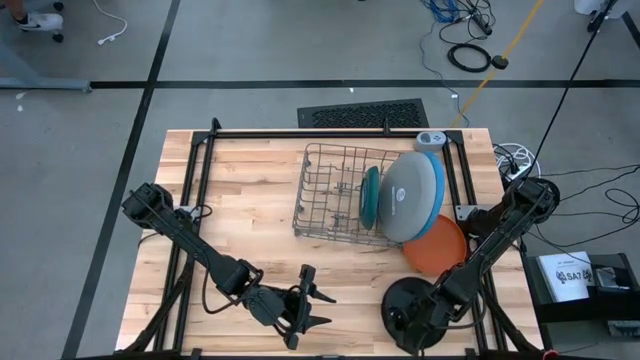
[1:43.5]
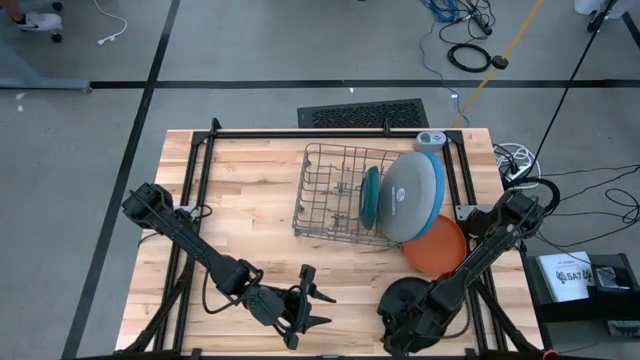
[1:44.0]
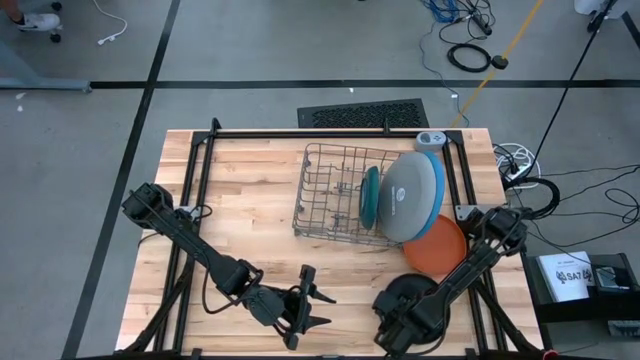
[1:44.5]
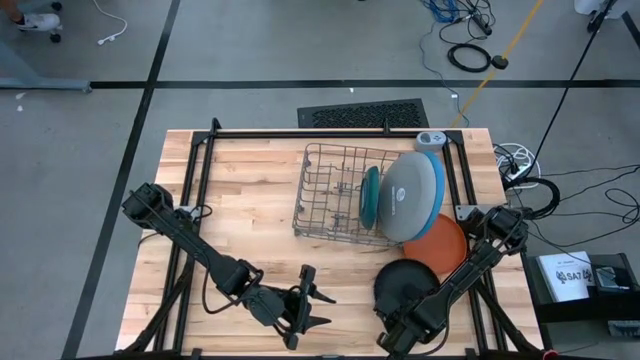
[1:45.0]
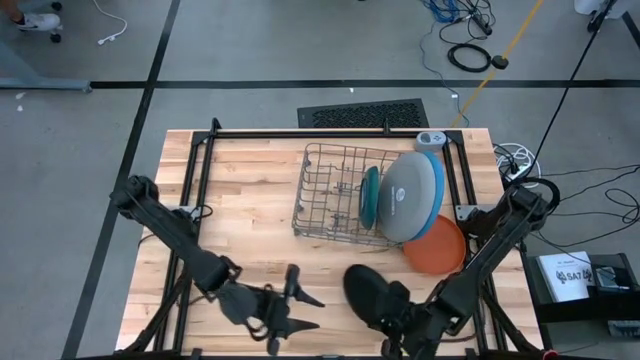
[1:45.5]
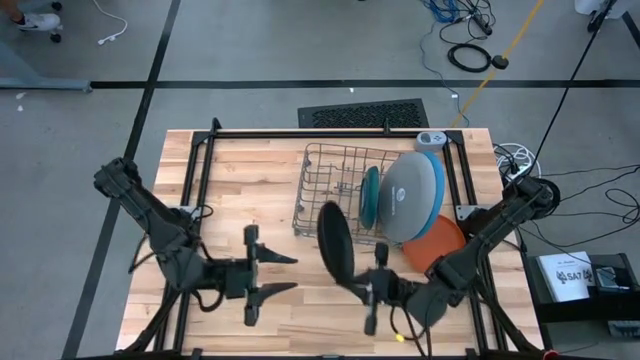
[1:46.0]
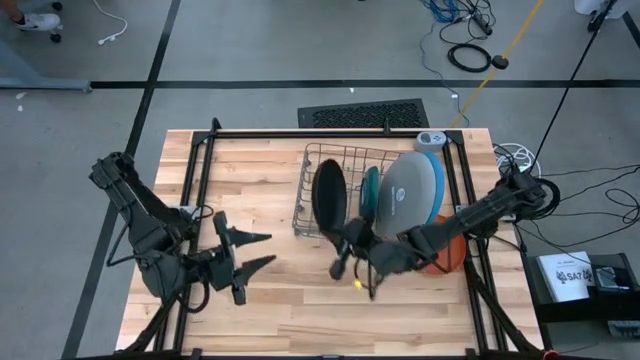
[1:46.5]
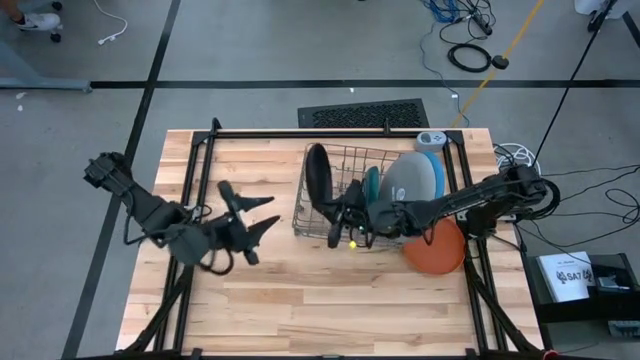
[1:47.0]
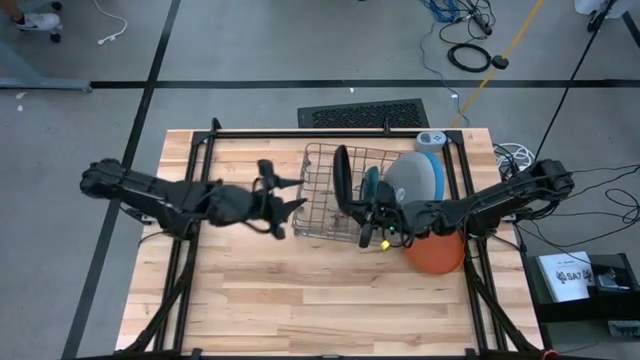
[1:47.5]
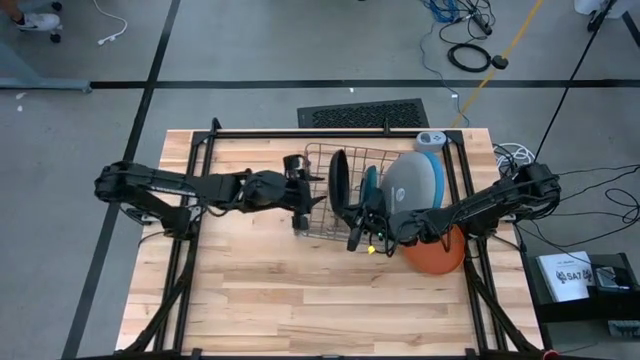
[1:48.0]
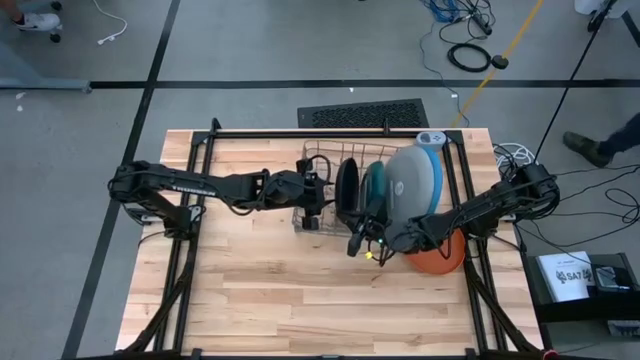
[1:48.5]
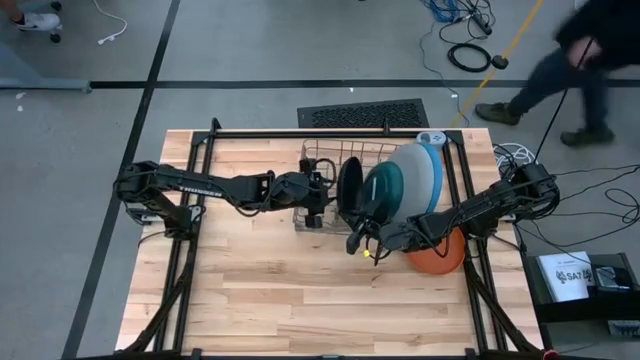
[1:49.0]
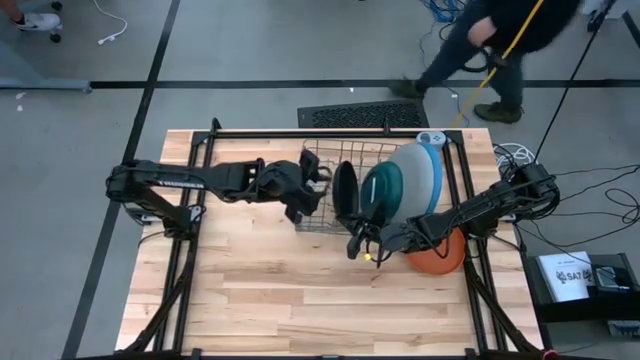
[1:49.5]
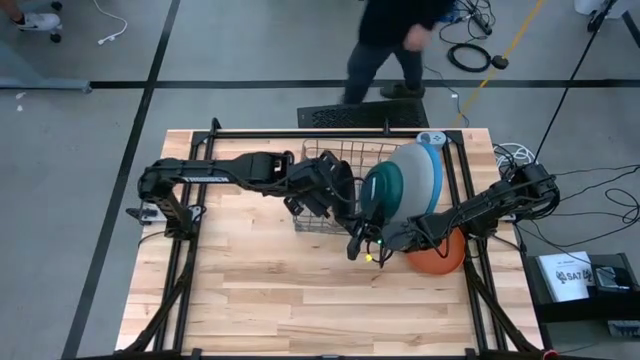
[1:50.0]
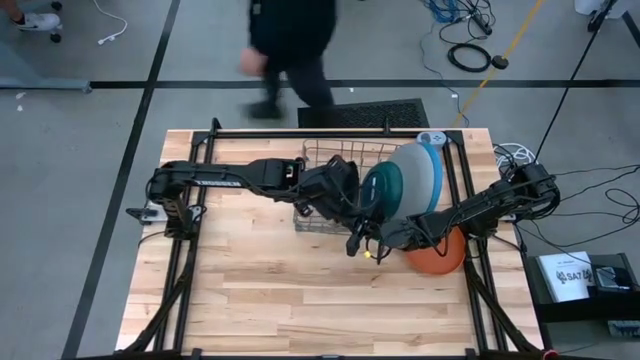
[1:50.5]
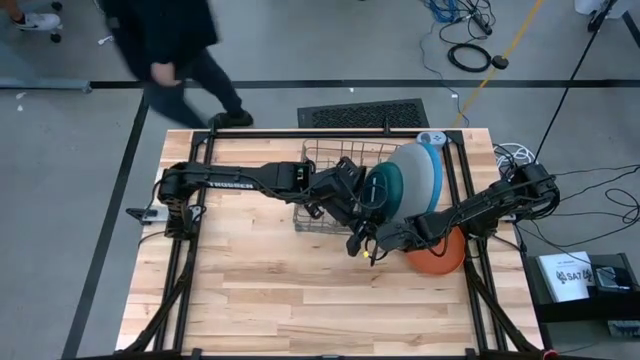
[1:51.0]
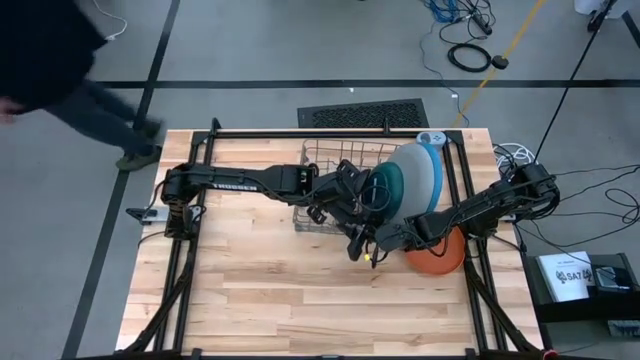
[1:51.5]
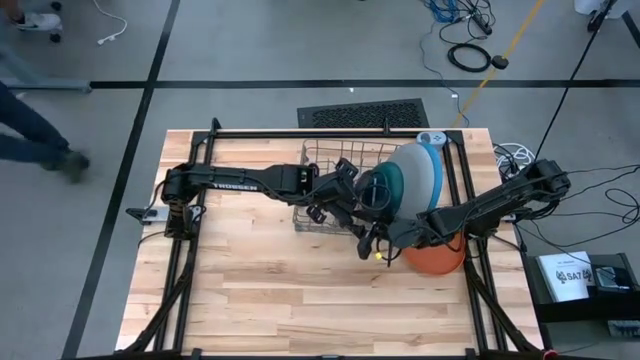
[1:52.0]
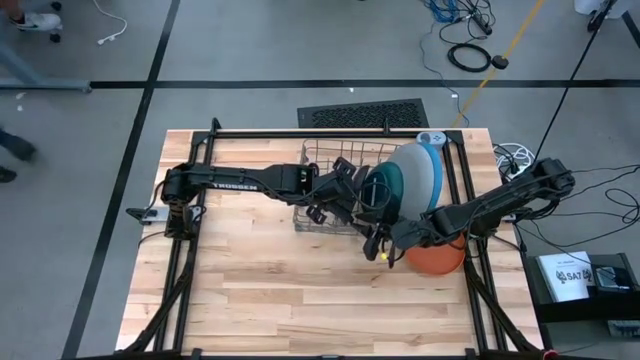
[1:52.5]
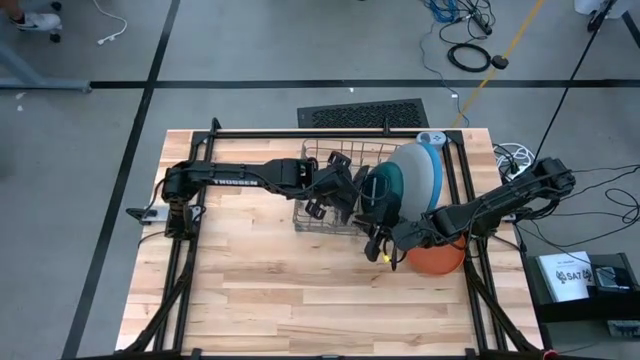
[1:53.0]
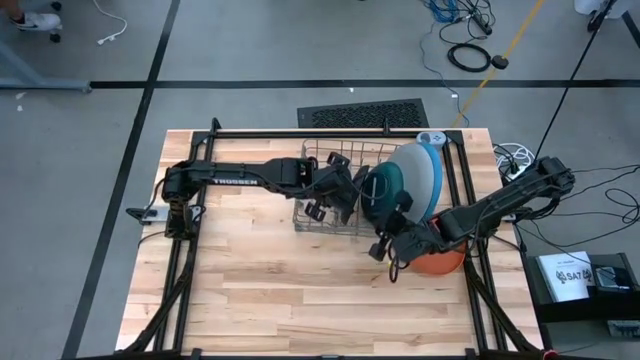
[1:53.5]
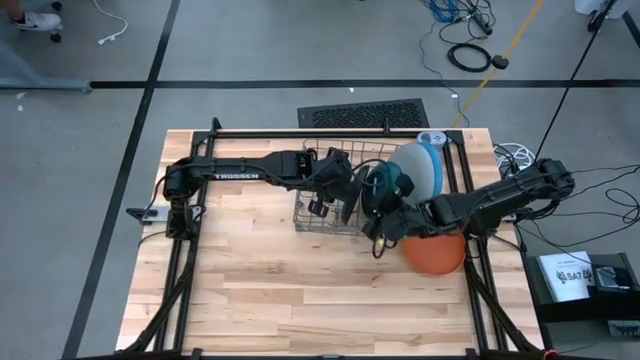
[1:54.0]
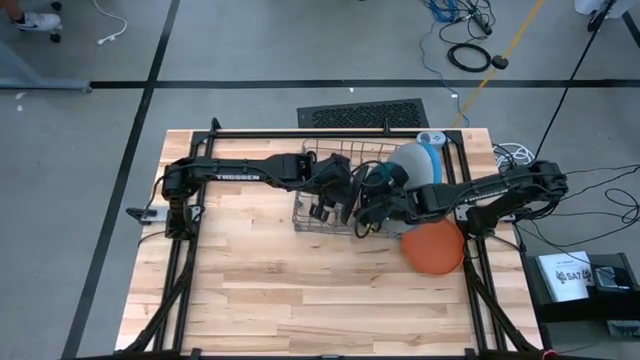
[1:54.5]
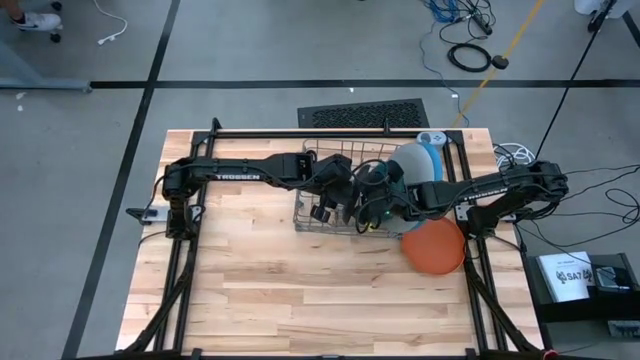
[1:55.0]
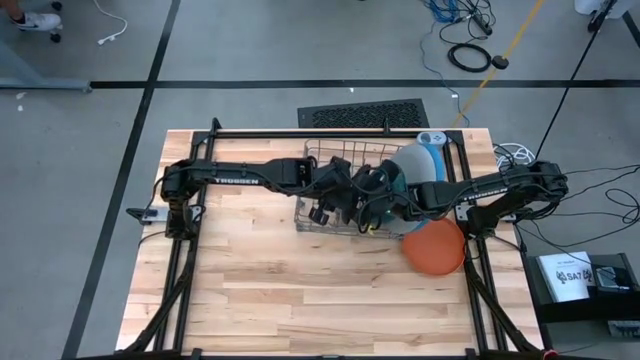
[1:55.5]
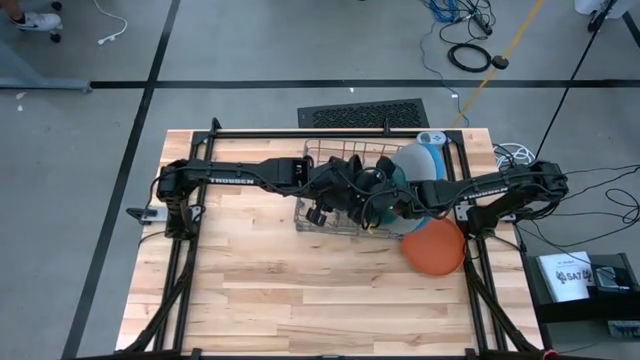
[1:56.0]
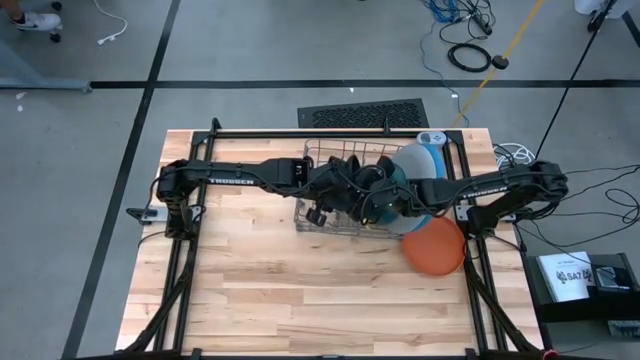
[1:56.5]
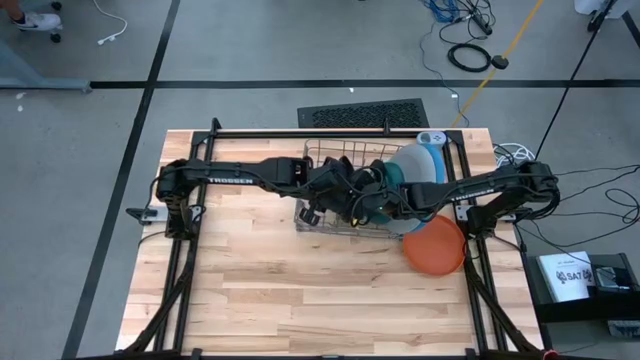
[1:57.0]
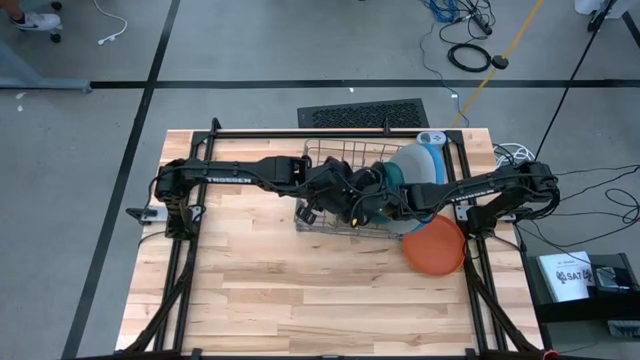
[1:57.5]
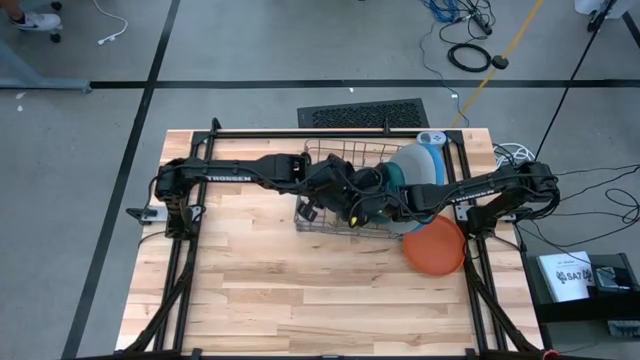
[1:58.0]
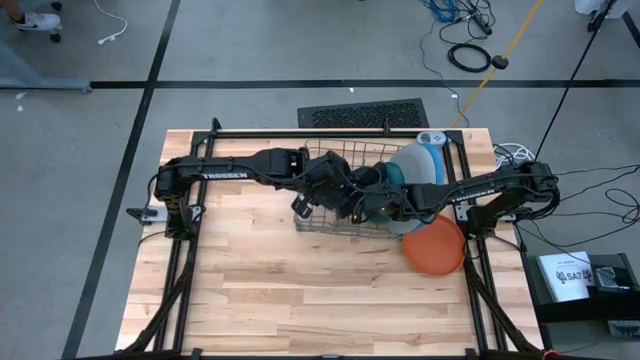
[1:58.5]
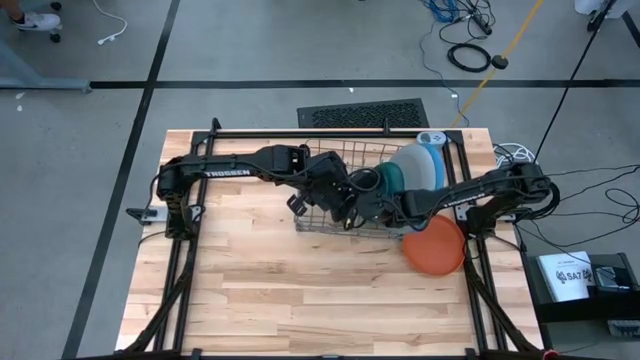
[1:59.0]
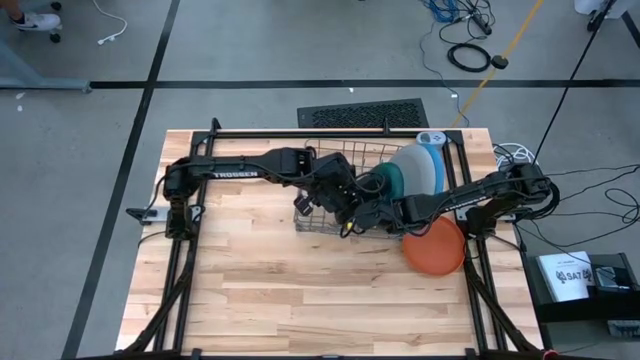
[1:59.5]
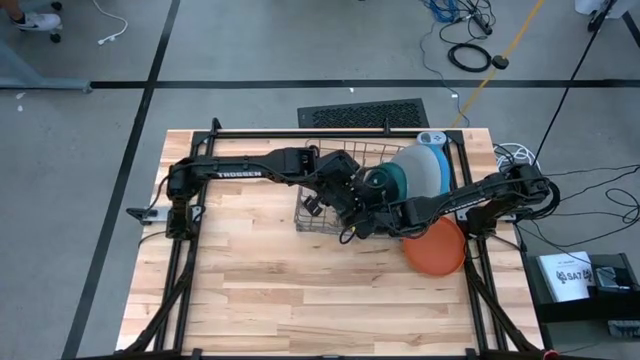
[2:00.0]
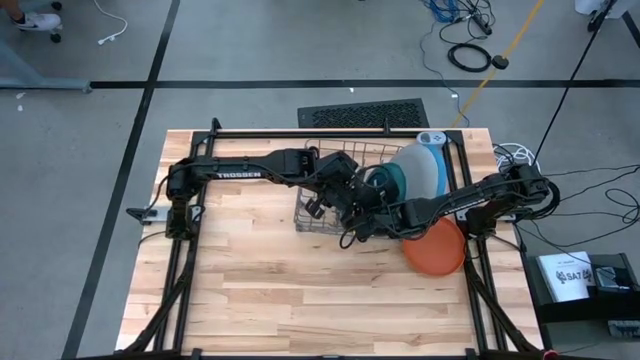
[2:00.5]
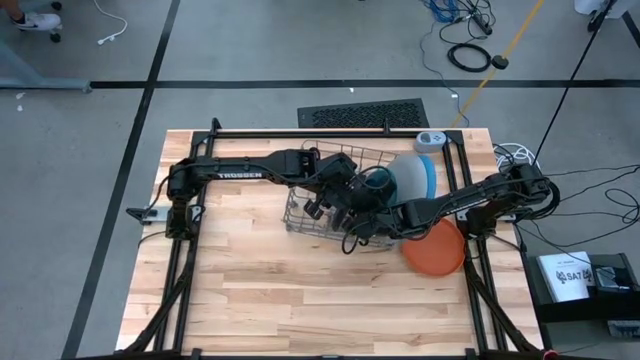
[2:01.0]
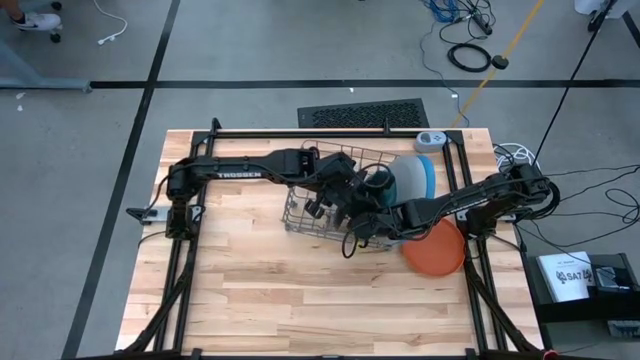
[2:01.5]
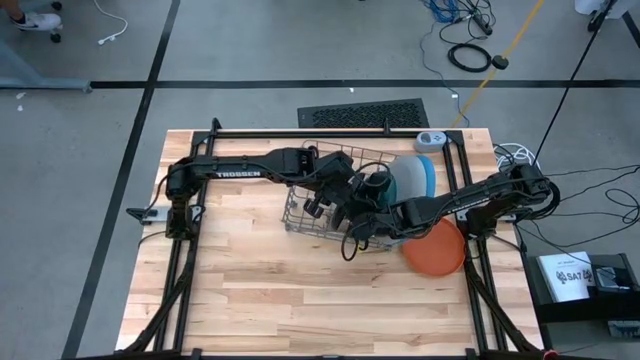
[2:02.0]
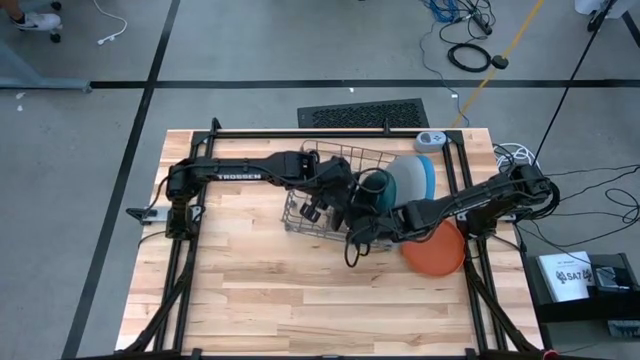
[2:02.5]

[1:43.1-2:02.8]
Task: Sort dishes
Put the black plate into the dish rack

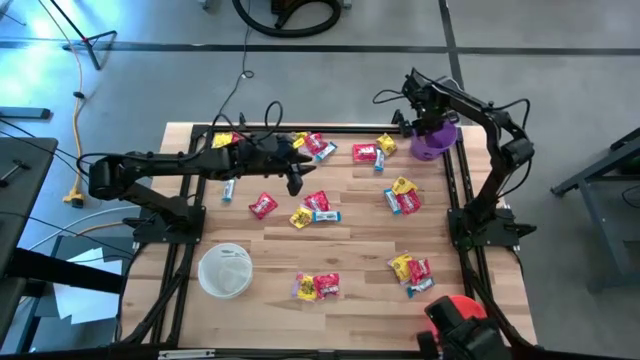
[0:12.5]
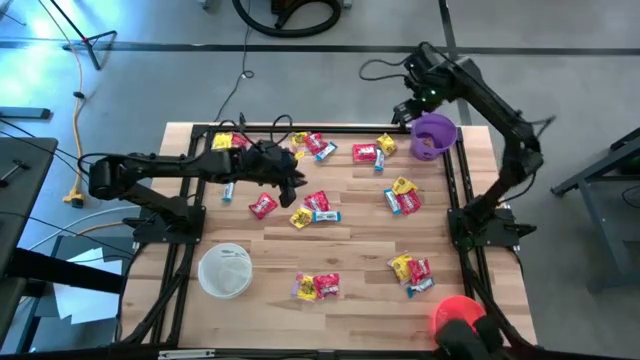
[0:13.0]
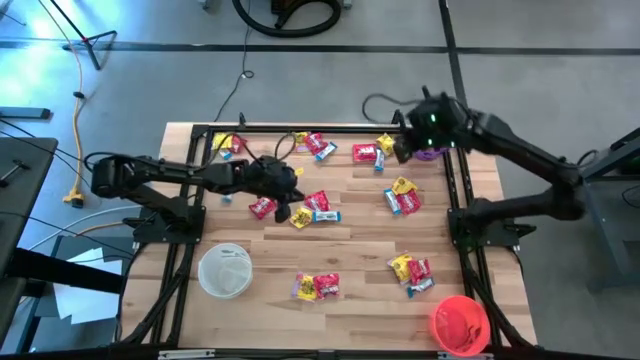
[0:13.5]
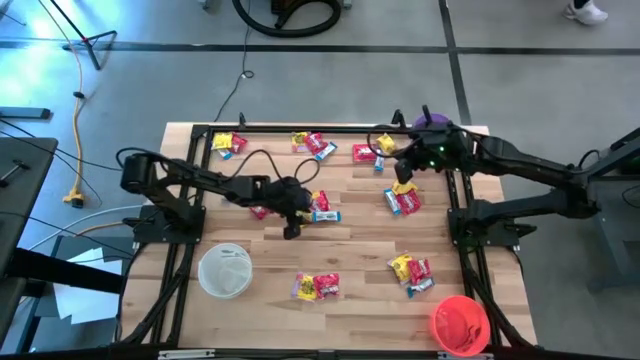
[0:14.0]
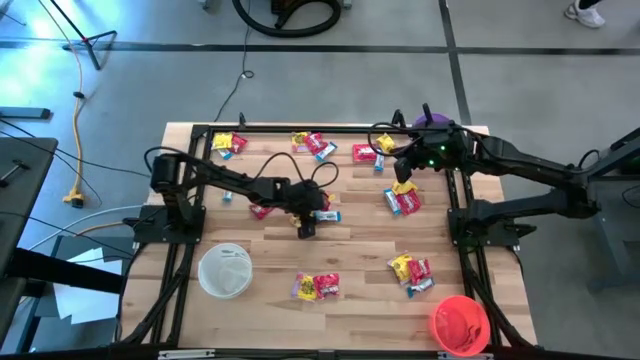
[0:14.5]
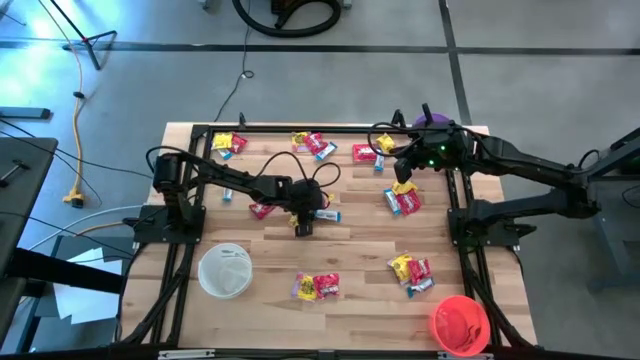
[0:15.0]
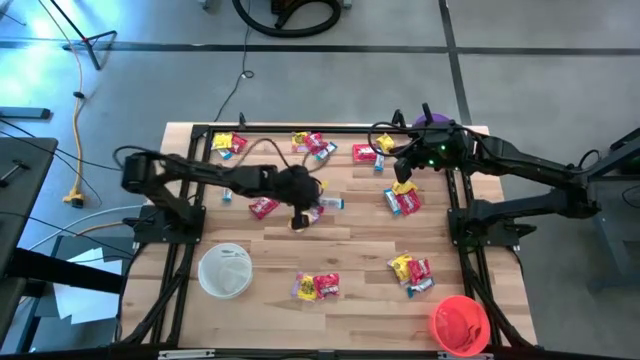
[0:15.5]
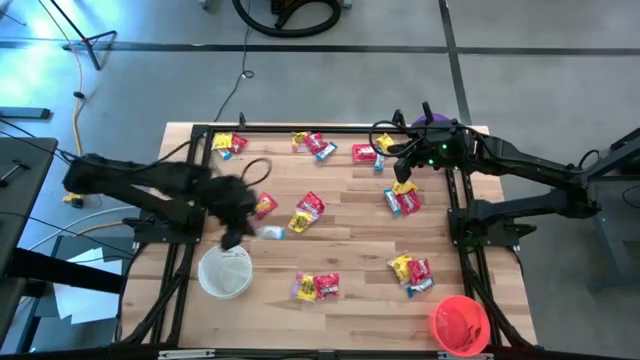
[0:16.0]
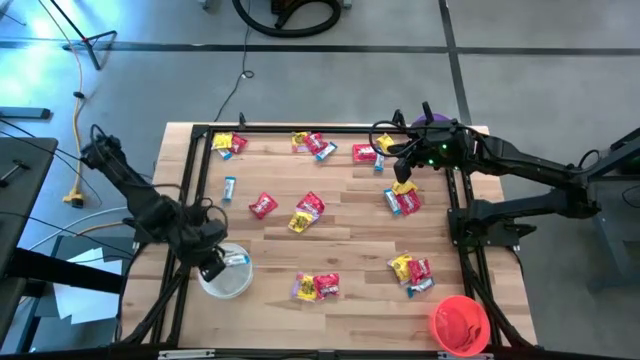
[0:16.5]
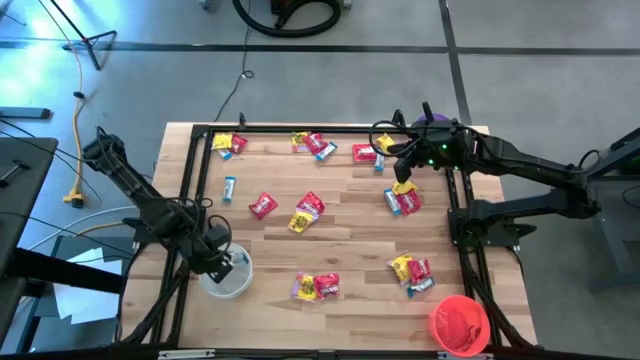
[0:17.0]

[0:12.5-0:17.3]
Task: Sort candy
Put the white chocolate bar into the white bin
